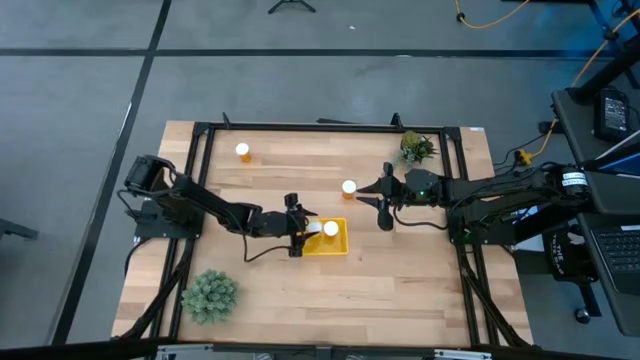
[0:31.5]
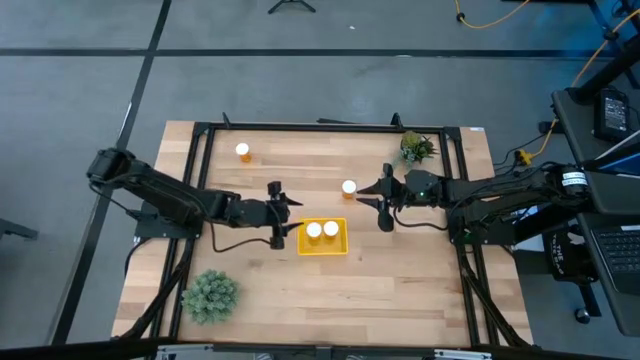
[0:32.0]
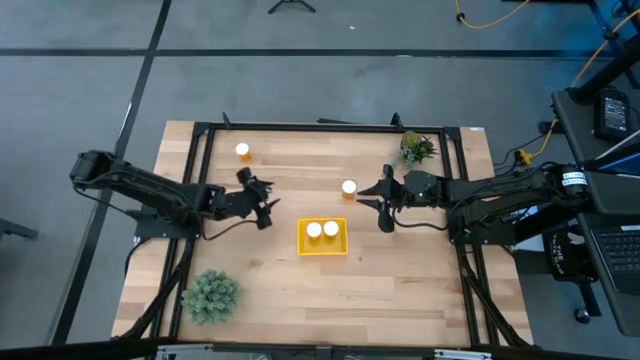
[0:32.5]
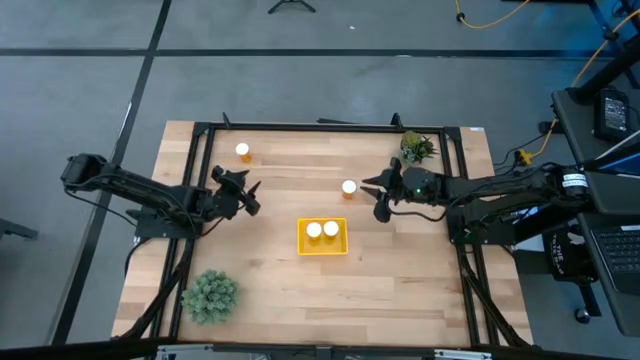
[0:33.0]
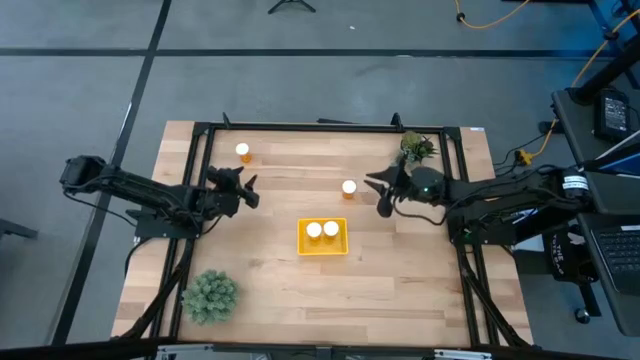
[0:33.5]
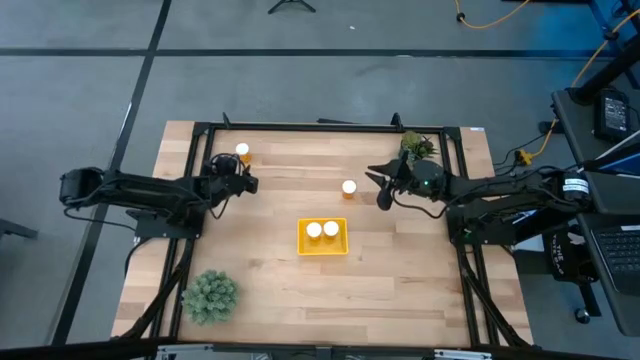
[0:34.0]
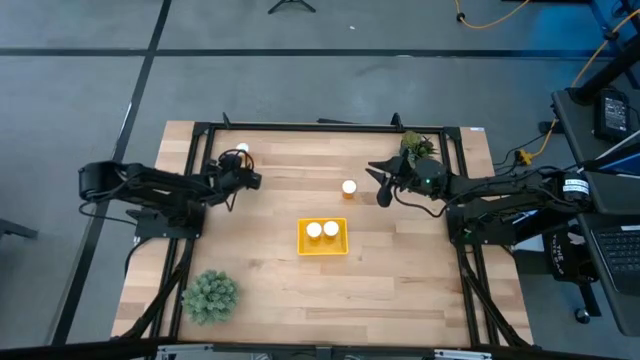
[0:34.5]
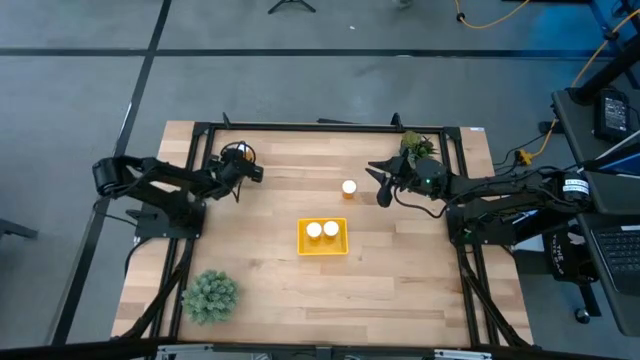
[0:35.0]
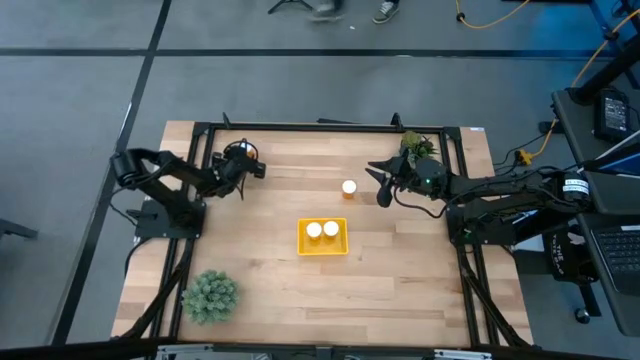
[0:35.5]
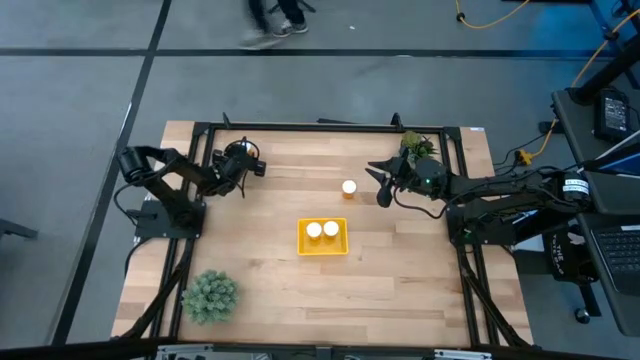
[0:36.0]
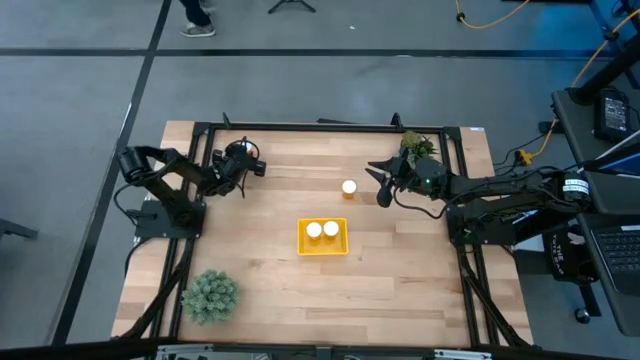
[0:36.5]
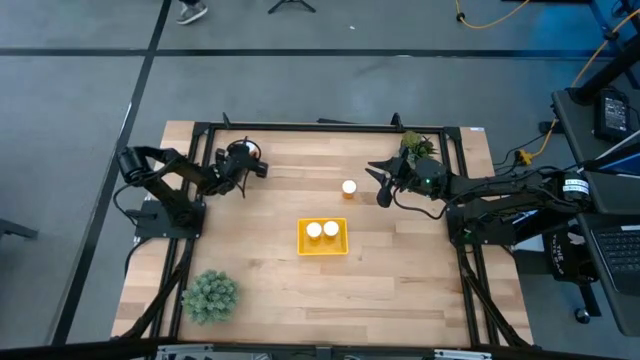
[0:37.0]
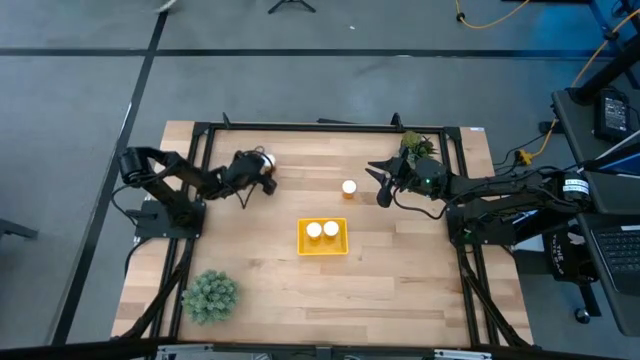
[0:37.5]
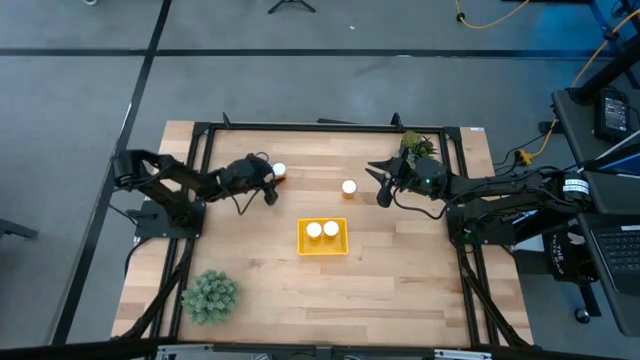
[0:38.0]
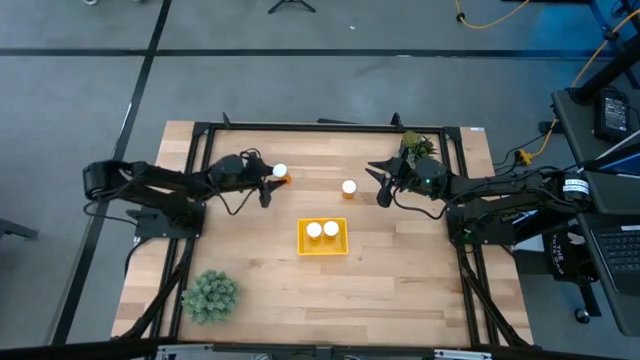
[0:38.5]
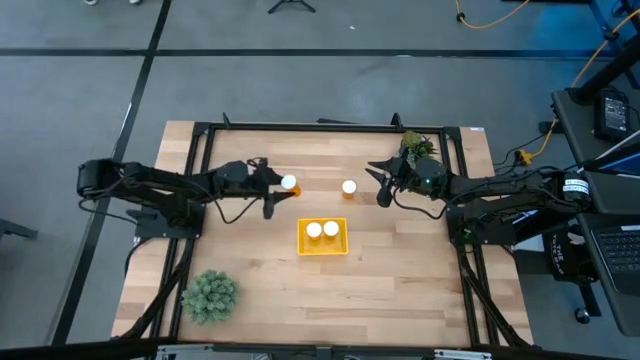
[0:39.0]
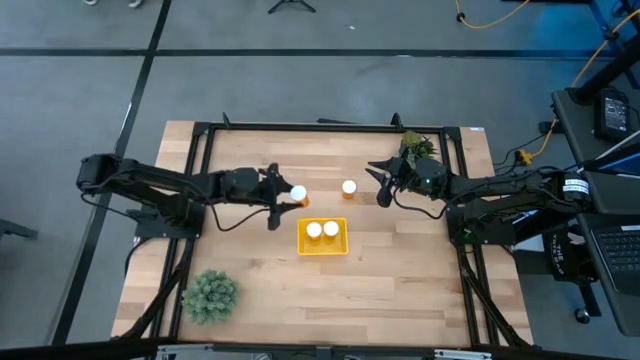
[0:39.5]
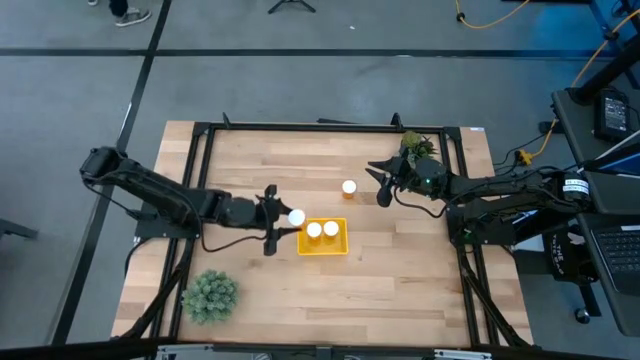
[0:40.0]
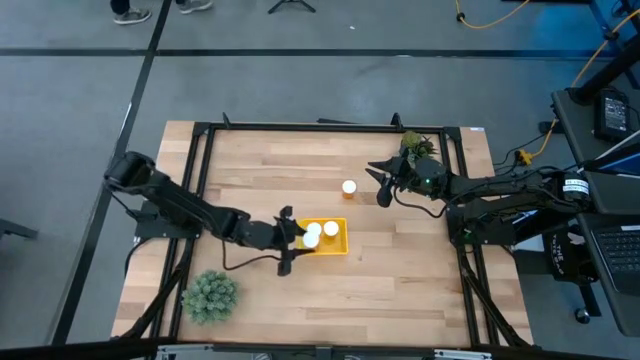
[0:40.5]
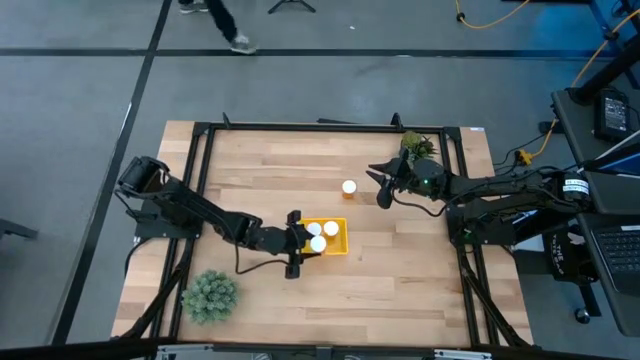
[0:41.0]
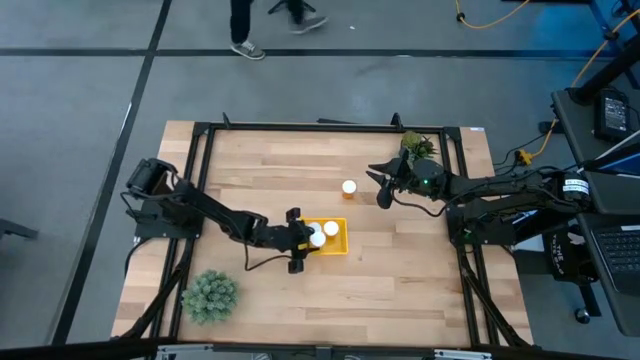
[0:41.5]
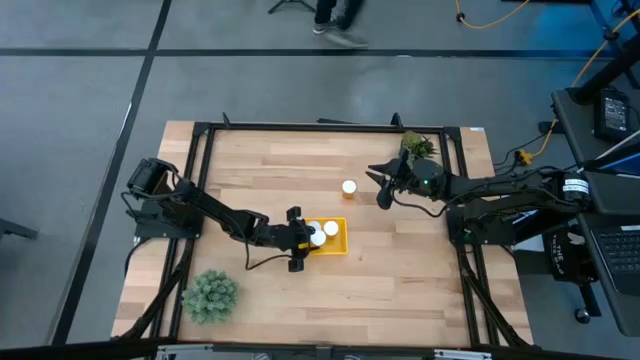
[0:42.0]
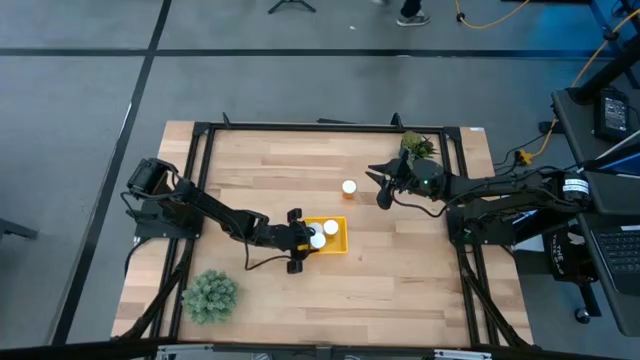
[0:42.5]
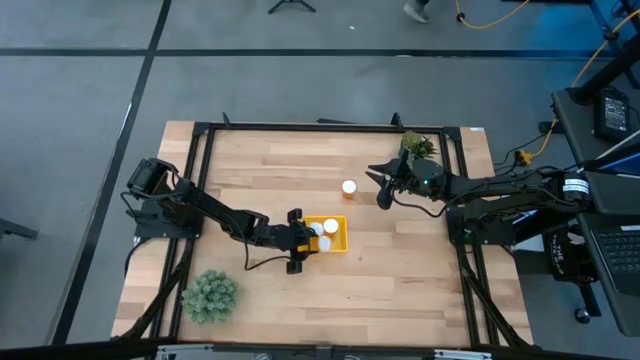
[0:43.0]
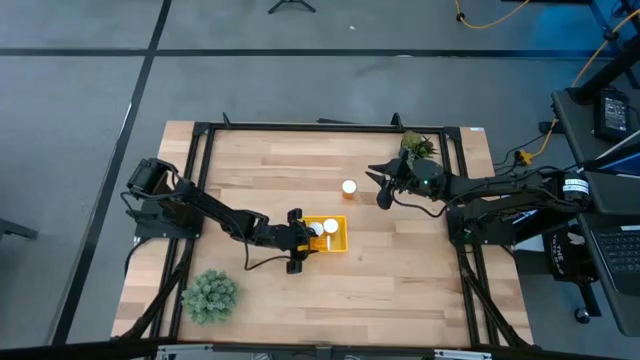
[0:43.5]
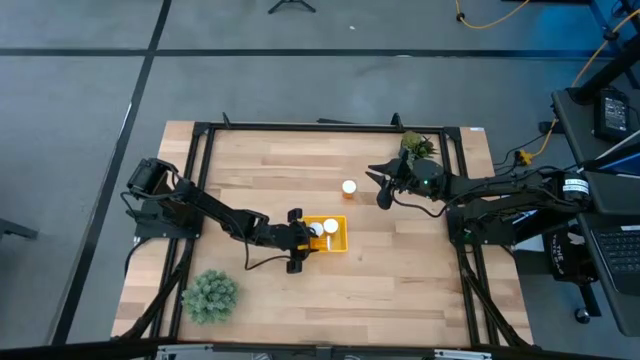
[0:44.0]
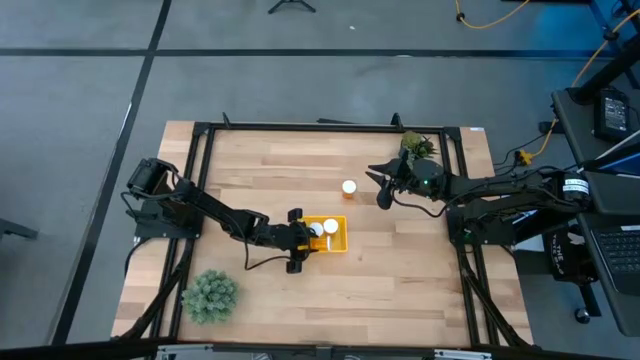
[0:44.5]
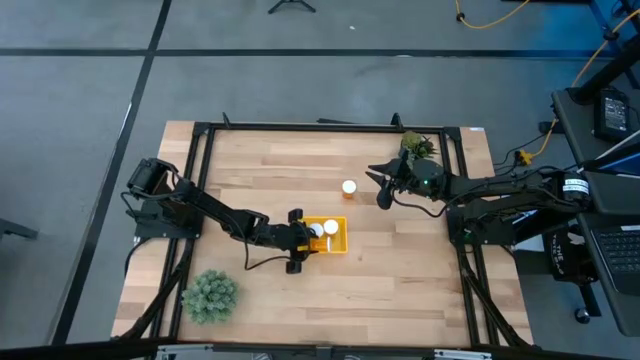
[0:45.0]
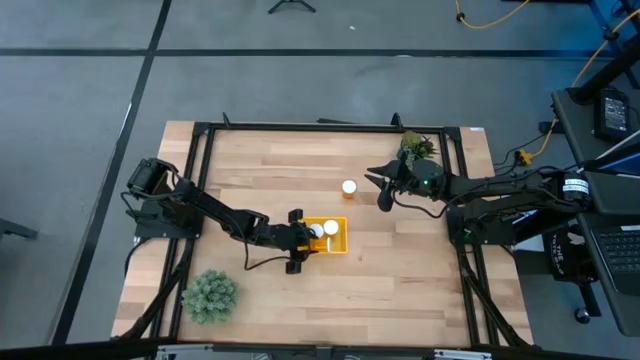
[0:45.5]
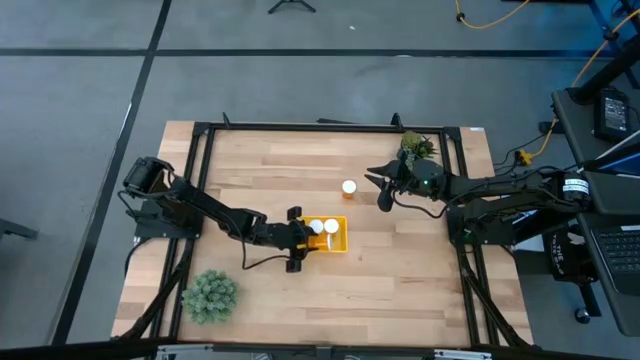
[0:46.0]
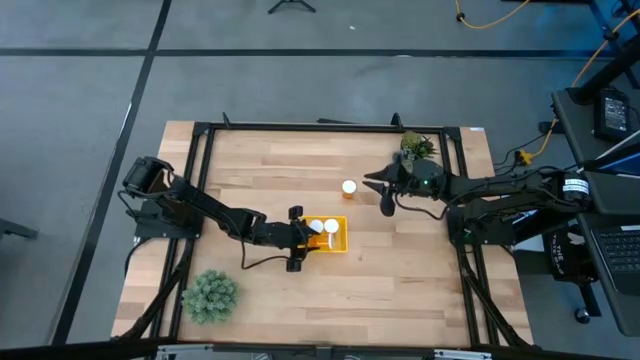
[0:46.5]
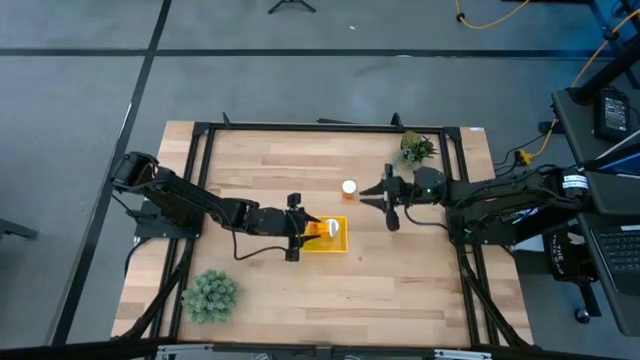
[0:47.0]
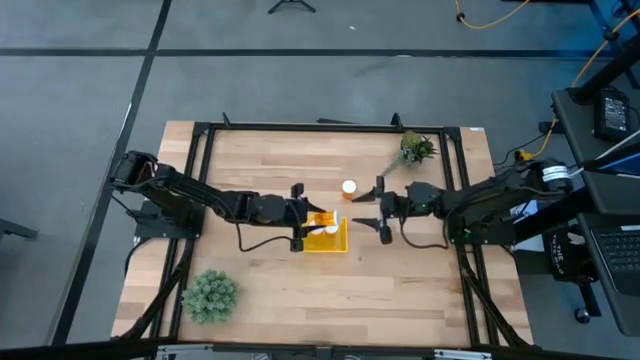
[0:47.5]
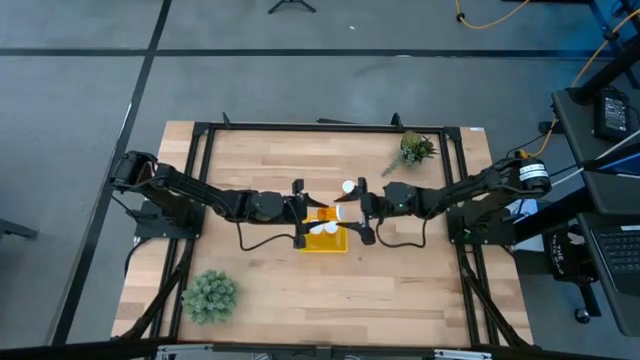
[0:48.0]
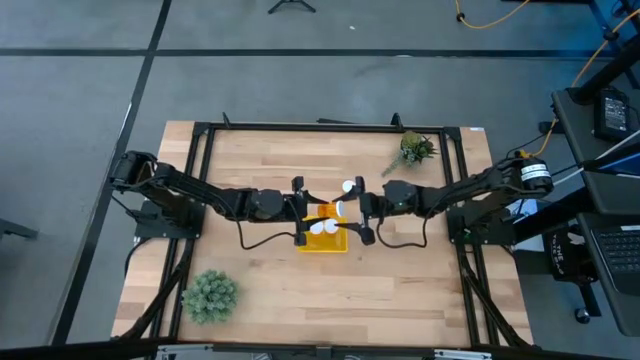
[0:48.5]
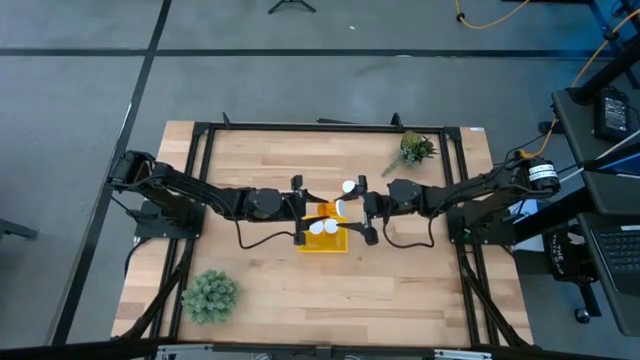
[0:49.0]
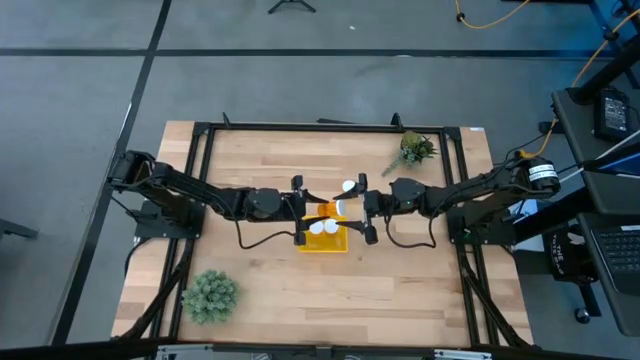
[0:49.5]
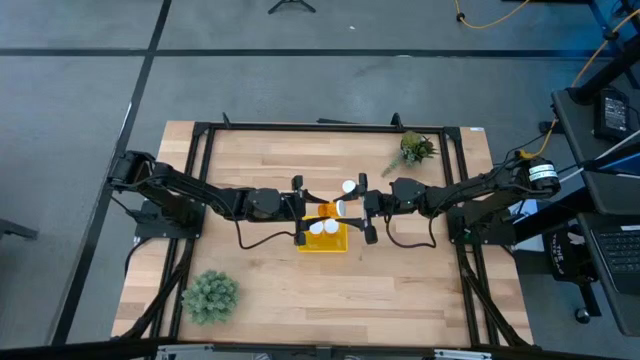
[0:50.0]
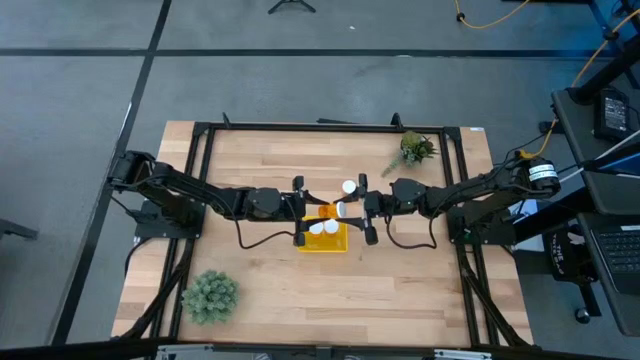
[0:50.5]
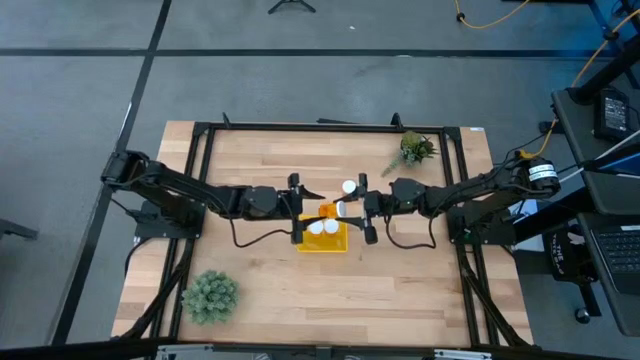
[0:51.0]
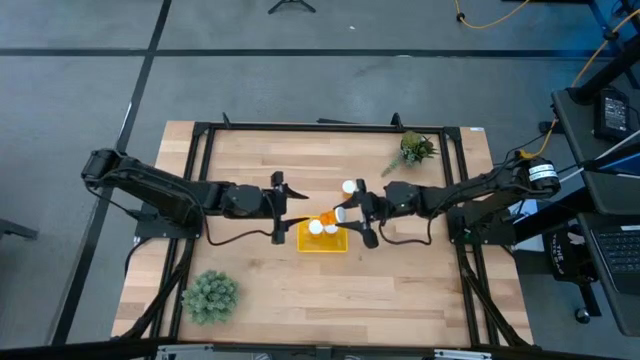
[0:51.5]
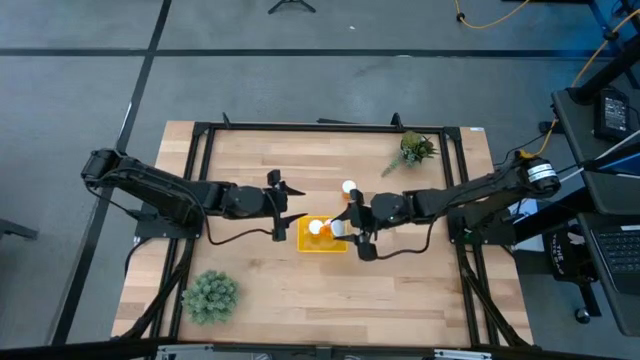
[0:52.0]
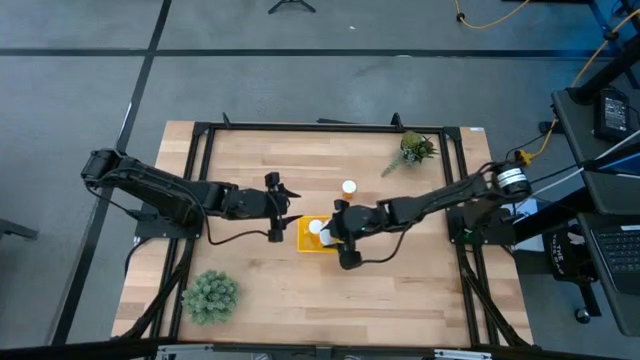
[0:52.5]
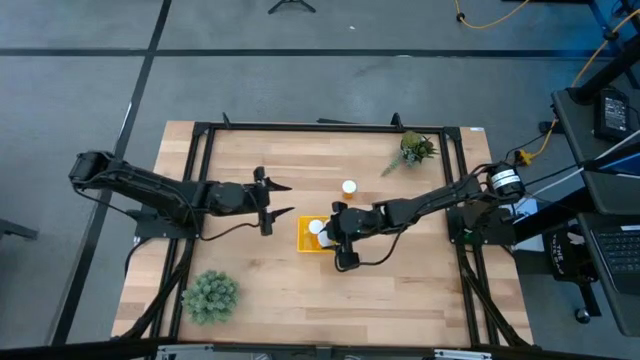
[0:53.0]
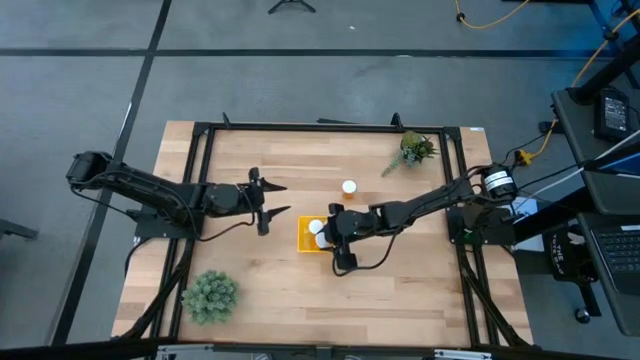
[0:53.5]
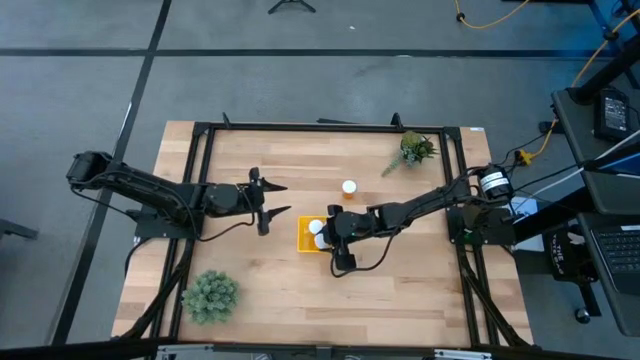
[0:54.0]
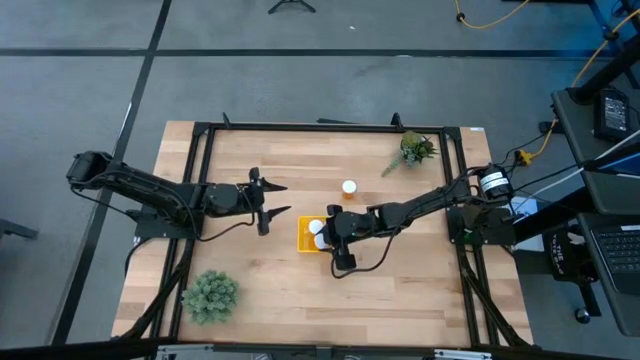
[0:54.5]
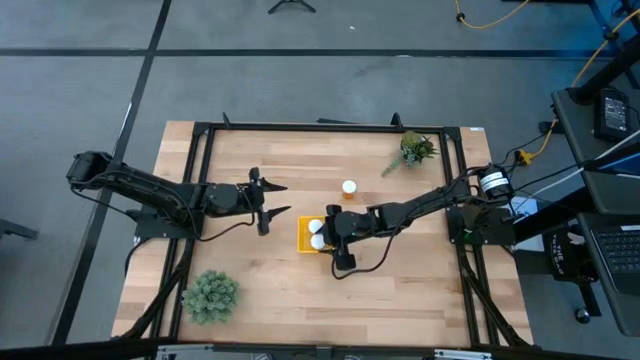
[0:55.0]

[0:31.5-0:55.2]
Task: Pick and place pill bottles into a basket
Put the orange pill bottle into the yellow bin
